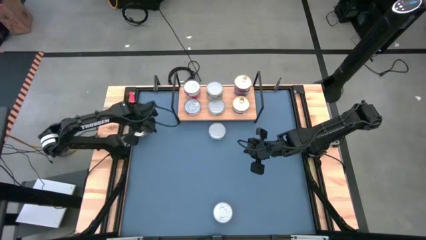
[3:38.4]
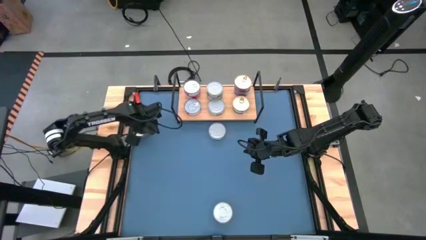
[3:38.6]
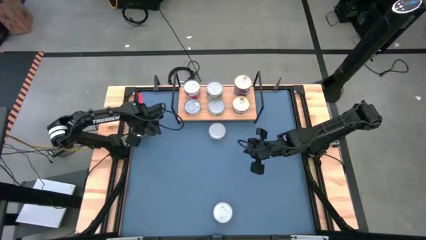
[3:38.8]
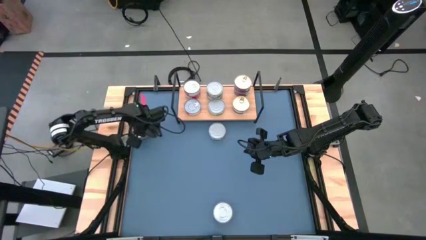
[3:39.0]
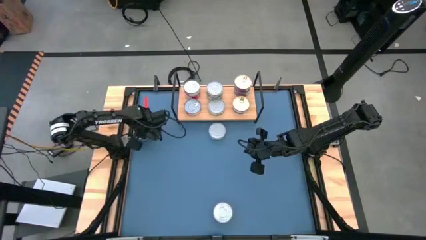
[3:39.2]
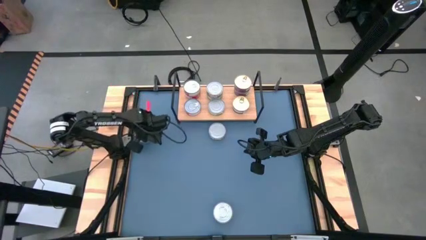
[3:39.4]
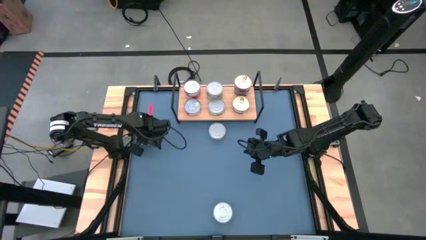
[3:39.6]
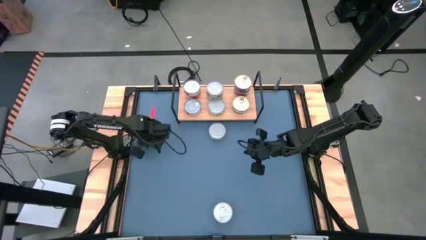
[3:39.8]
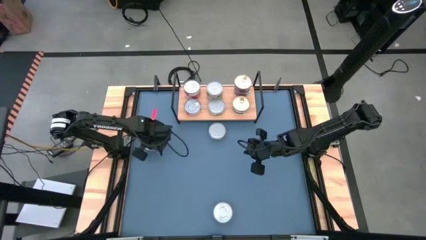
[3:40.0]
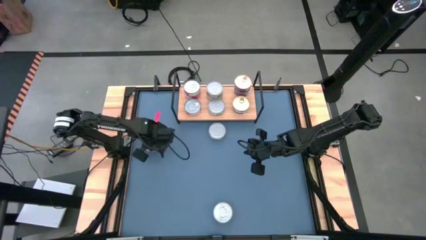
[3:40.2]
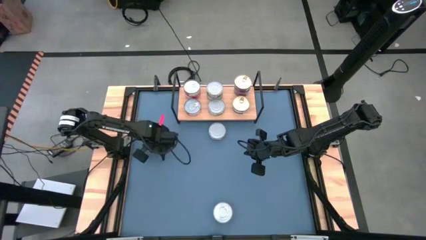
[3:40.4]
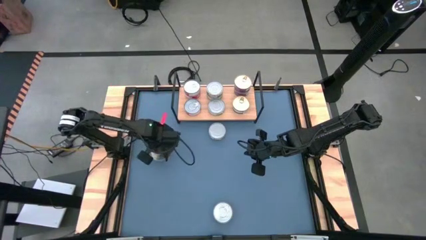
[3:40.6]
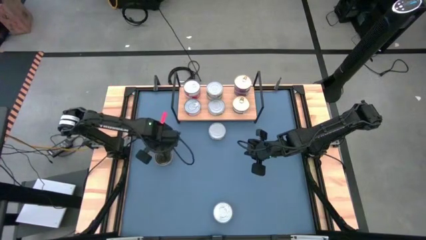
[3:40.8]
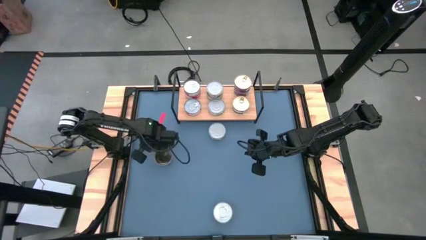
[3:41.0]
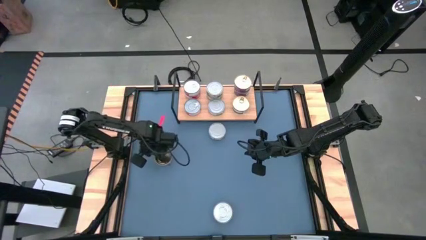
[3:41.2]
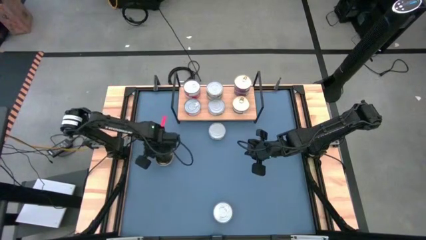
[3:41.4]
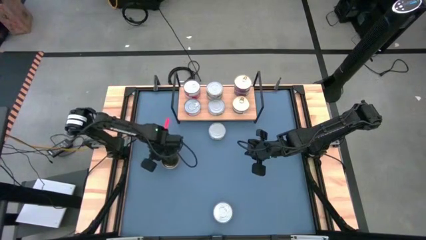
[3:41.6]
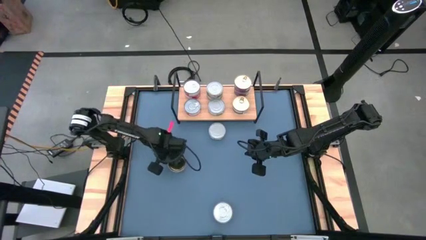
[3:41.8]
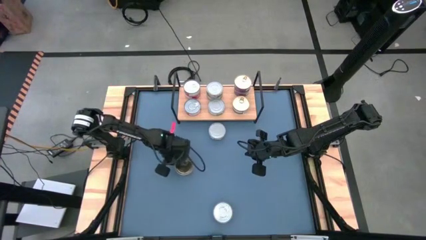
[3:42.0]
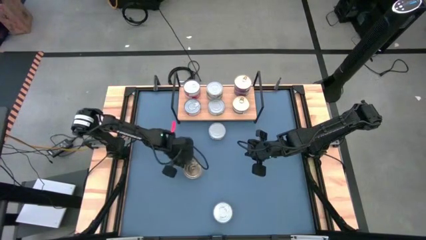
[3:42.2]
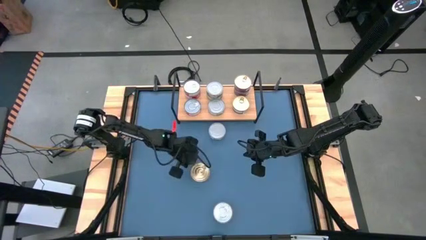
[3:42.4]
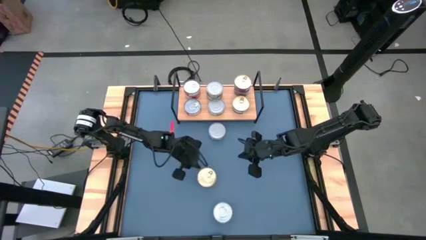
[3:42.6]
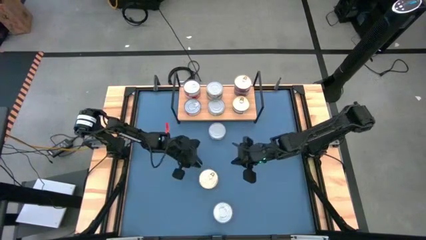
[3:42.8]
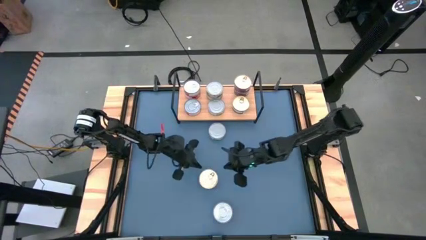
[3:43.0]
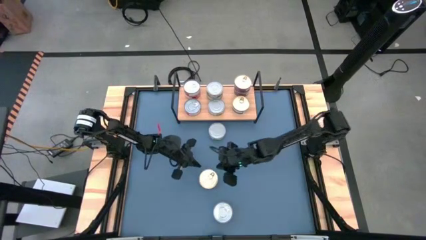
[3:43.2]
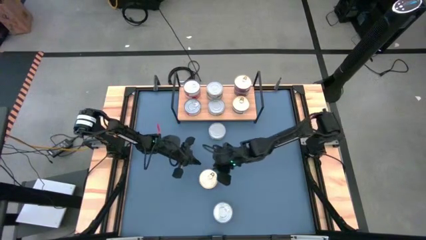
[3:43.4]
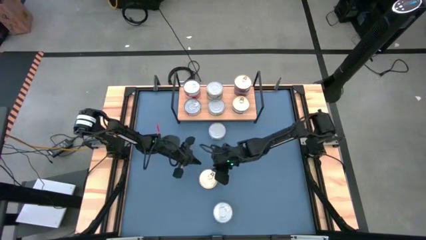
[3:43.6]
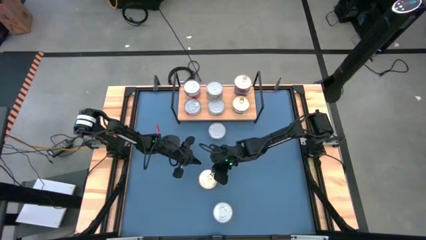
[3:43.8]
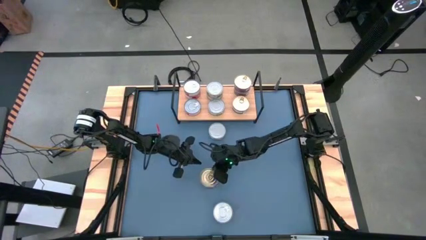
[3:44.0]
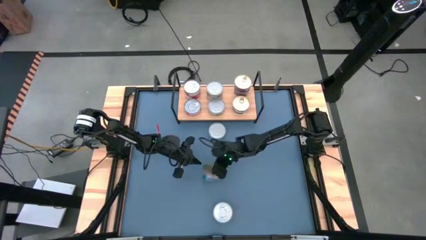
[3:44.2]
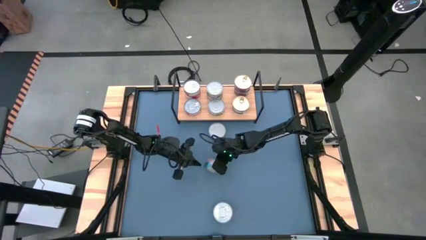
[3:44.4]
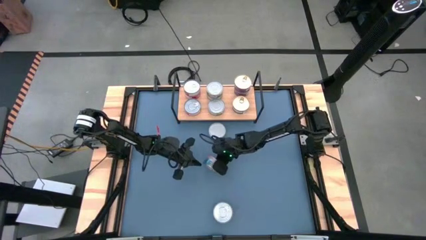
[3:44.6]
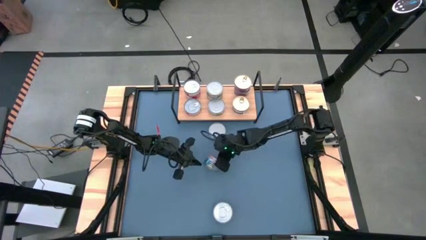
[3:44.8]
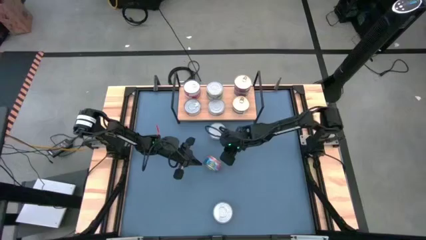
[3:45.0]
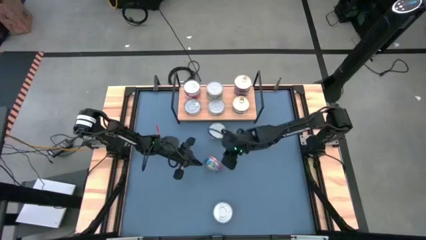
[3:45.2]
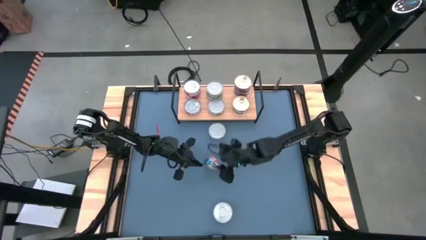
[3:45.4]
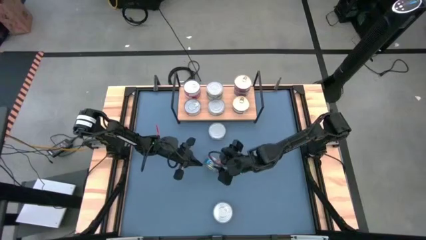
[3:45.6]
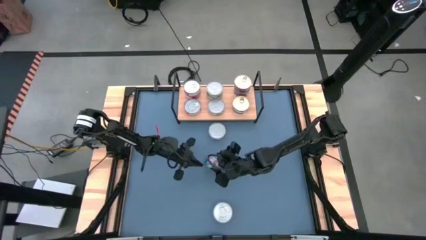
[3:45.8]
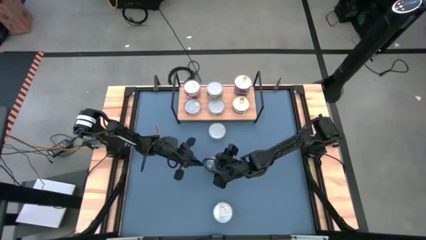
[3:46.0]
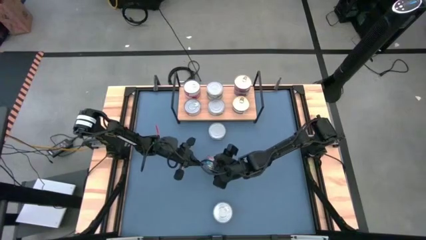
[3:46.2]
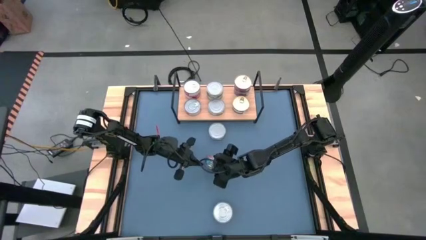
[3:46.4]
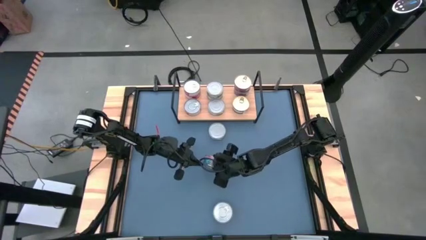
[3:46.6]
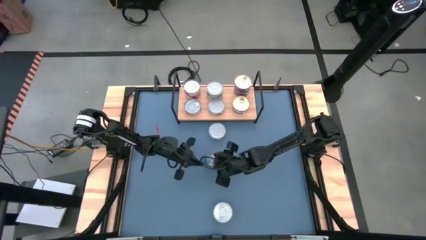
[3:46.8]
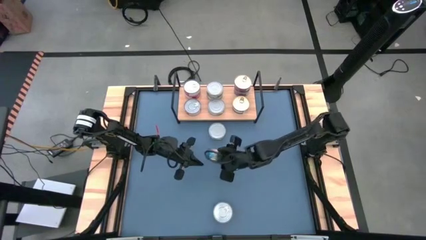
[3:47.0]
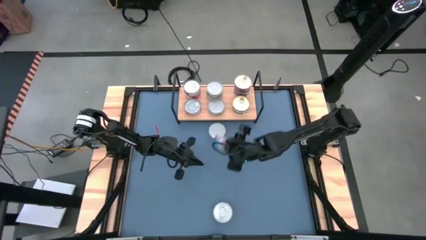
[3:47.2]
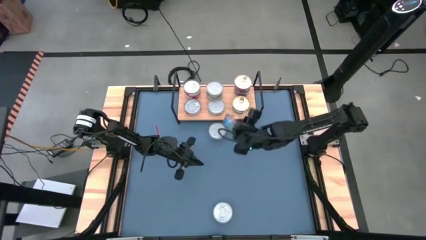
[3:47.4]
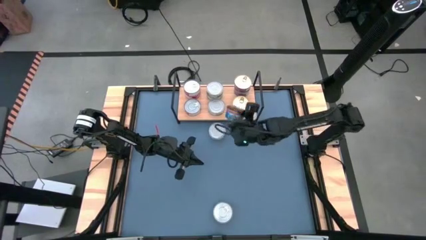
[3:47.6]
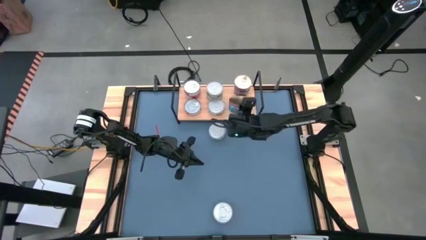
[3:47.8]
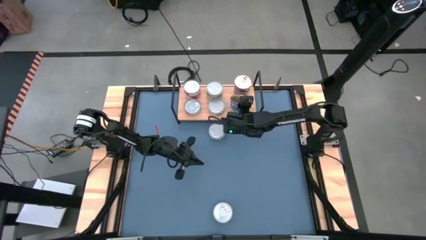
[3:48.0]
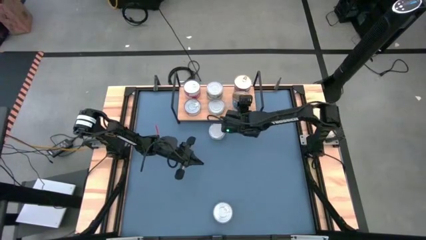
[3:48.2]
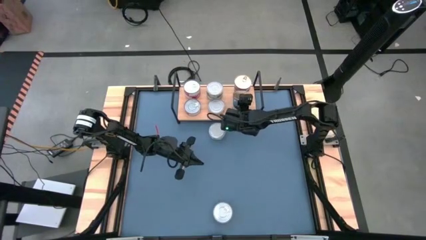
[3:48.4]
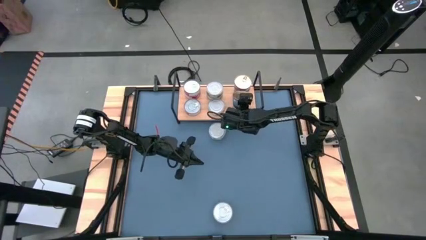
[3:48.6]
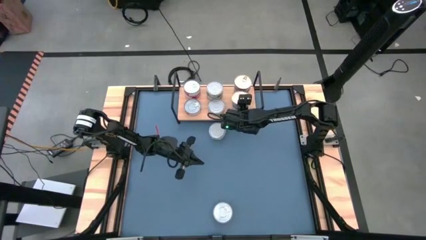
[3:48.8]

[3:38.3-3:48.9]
Task: Stack canned seafood by type on shelf
Stack the blue tuna can on top of the blue tuna can on the shelf

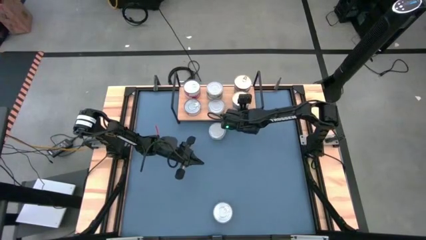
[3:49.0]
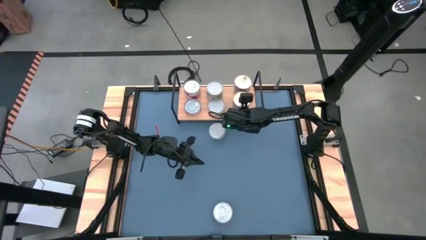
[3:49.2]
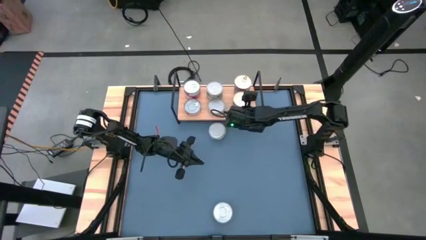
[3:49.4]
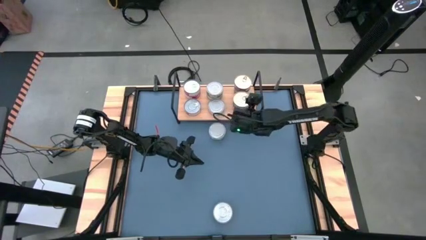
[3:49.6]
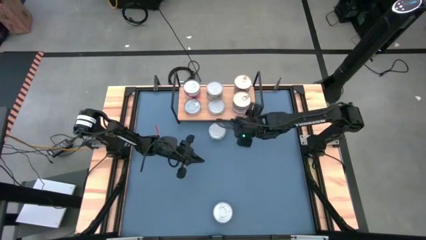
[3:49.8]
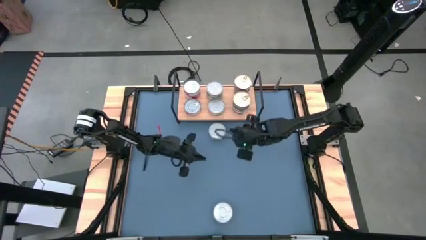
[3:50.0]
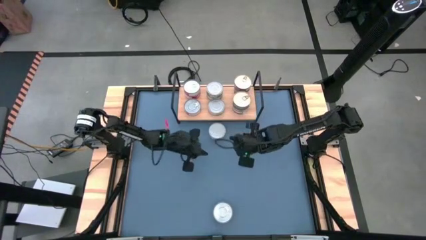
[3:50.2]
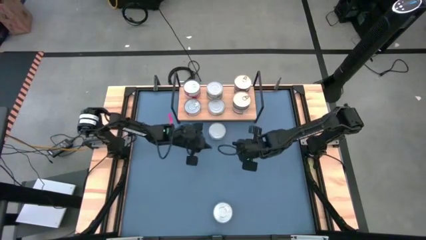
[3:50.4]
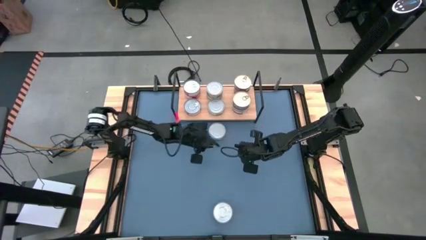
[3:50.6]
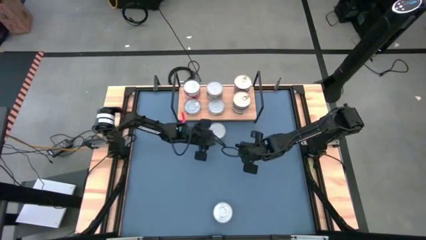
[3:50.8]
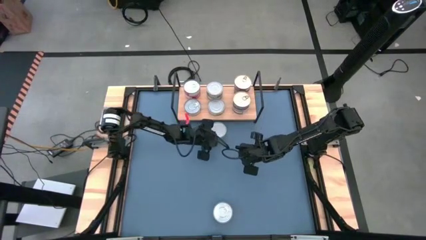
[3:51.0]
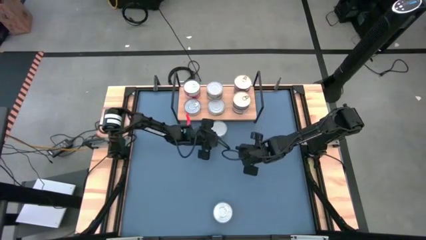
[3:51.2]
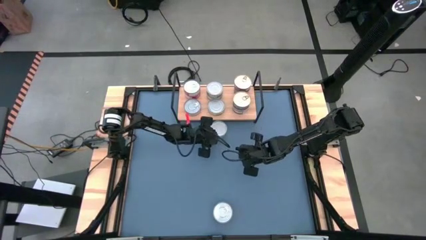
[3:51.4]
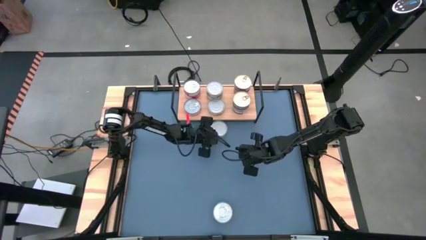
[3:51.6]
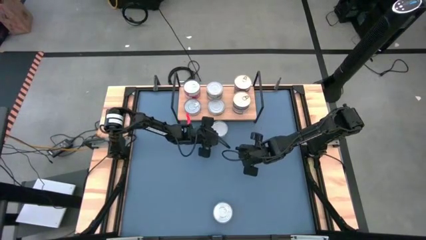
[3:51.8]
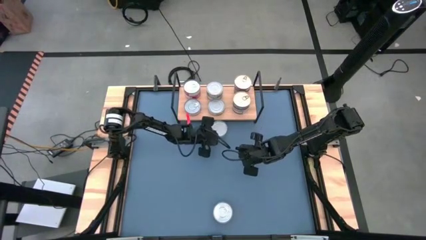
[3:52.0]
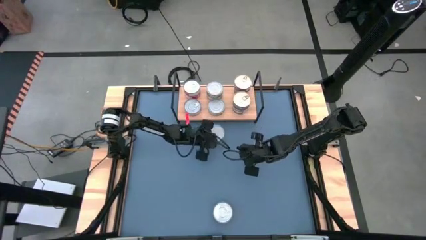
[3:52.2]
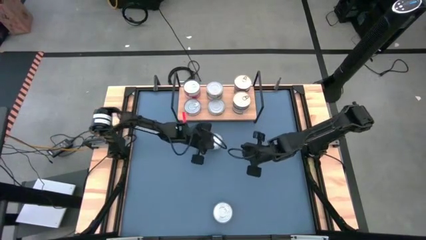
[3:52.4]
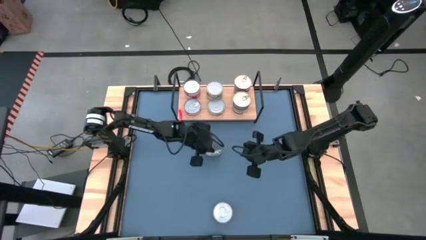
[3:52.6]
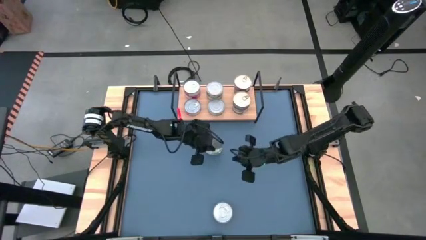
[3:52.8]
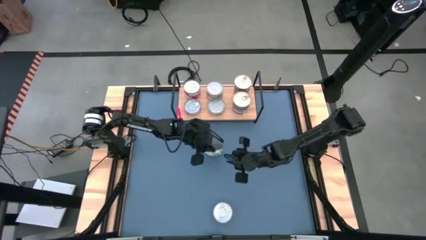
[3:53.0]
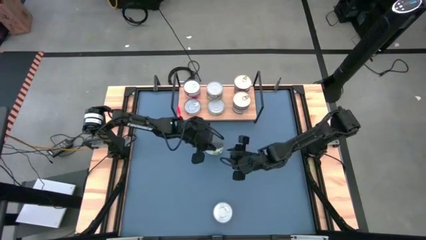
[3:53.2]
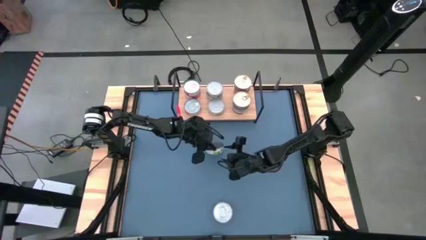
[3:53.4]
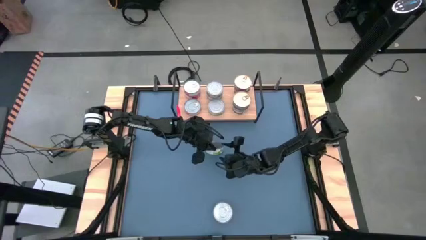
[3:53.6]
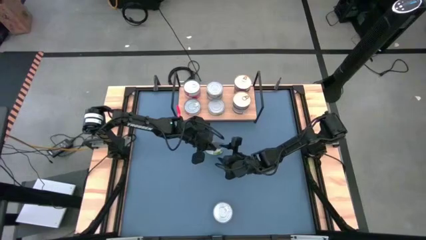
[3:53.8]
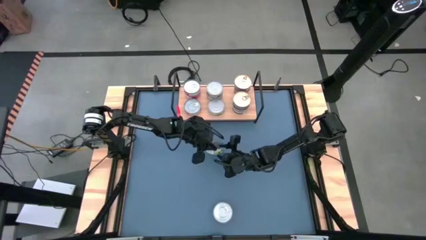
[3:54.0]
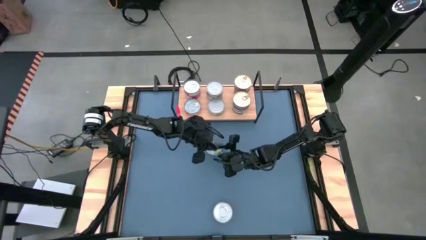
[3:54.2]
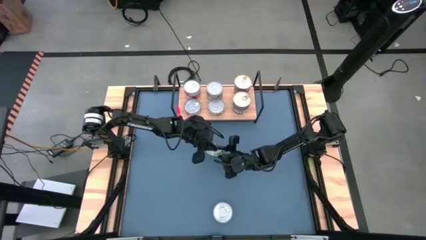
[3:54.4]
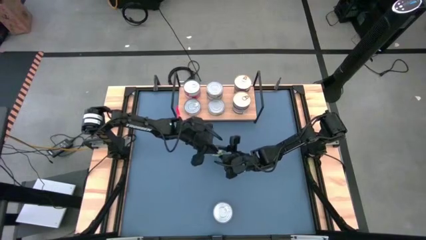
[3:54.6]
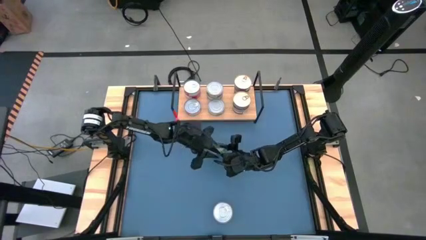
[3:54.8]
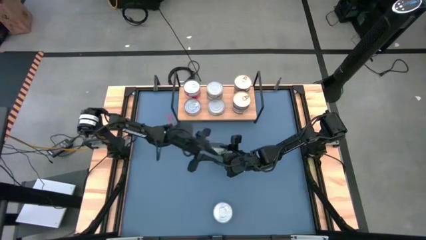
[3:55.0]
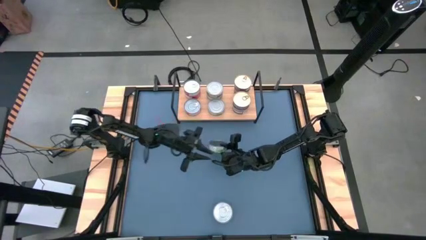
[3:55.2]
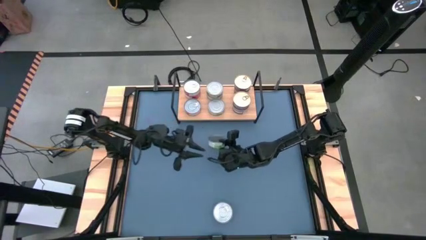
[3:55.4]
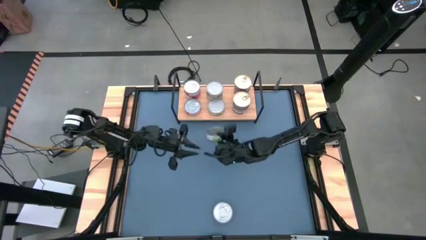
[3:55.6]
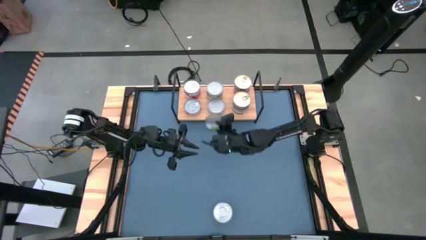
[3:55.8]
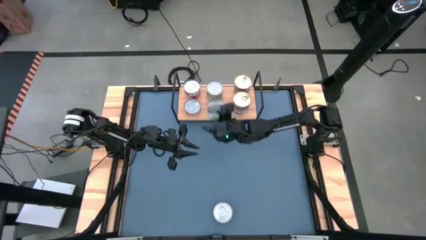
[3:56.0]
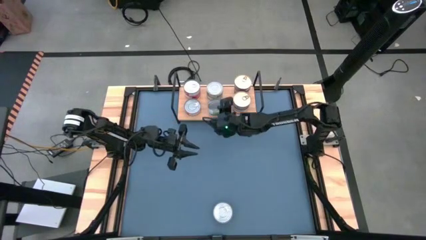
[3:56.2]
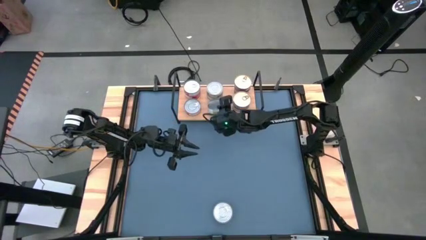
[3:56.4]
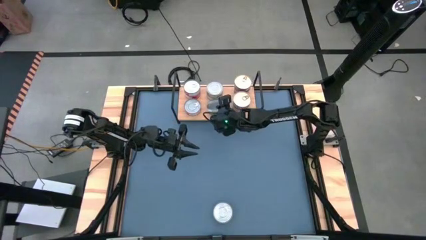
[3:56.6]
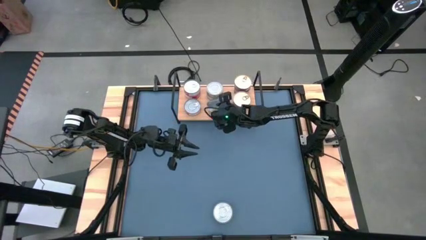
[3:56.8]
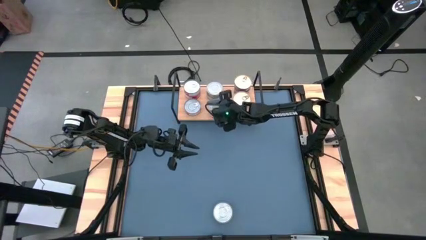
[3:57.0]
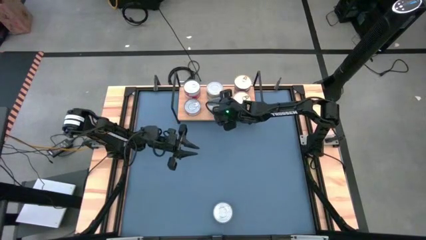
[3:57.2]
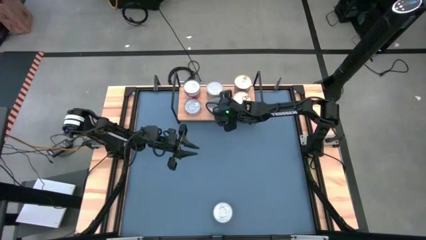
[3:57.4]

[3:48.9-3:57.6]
Stack the green tuna can on top of the green tuna can on the shelf
